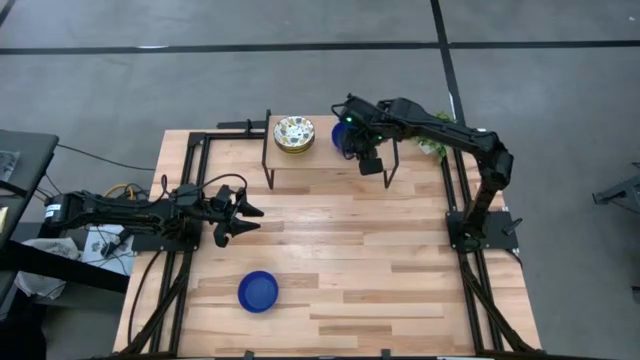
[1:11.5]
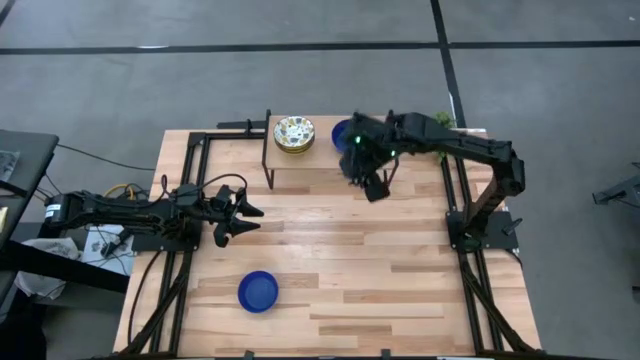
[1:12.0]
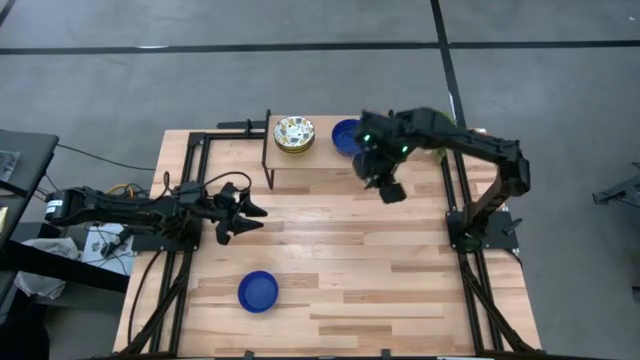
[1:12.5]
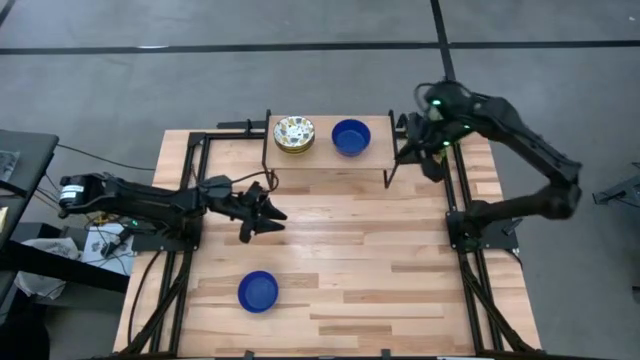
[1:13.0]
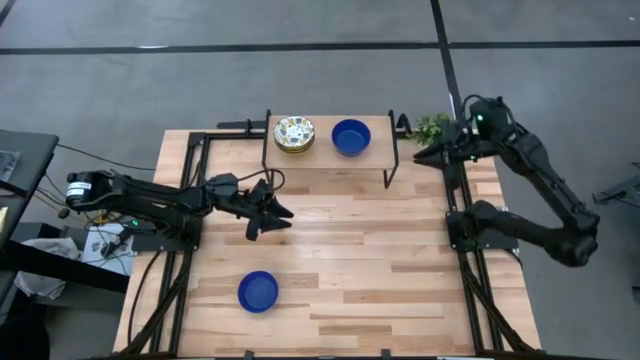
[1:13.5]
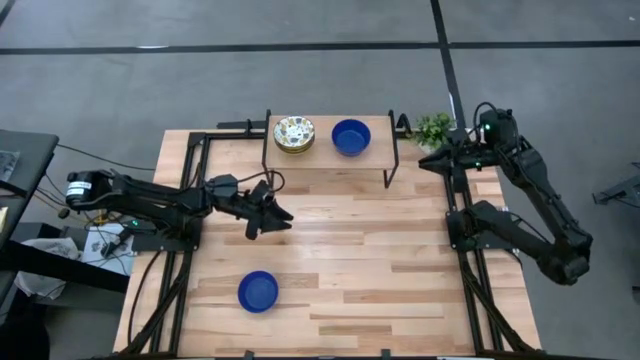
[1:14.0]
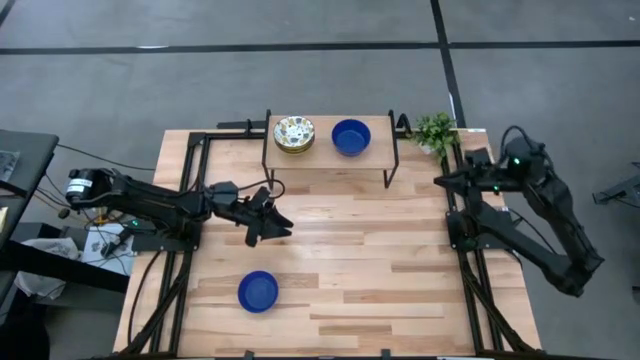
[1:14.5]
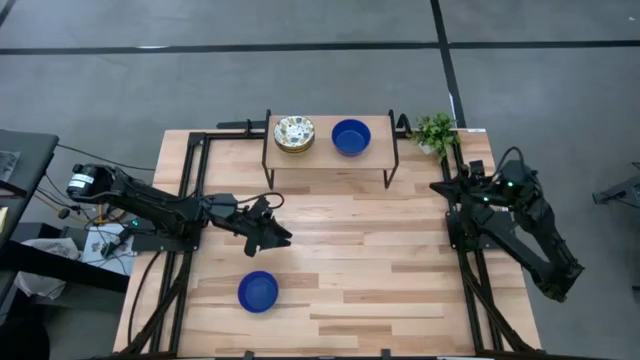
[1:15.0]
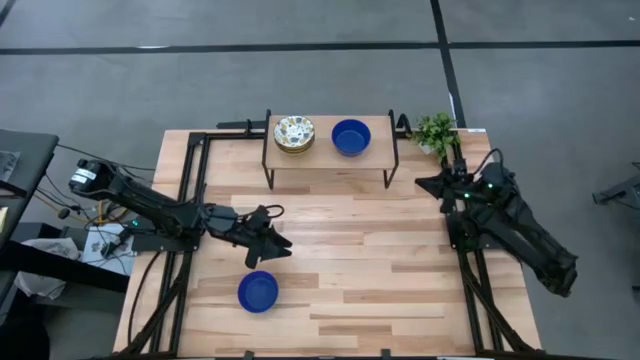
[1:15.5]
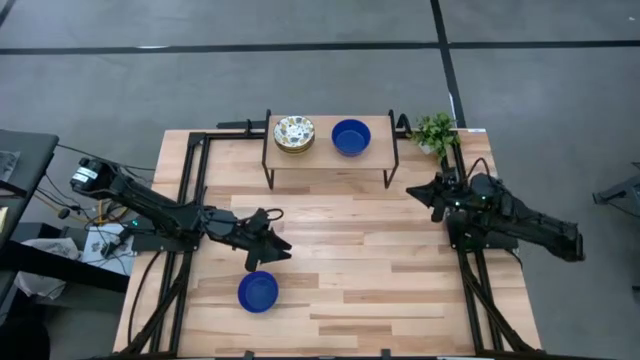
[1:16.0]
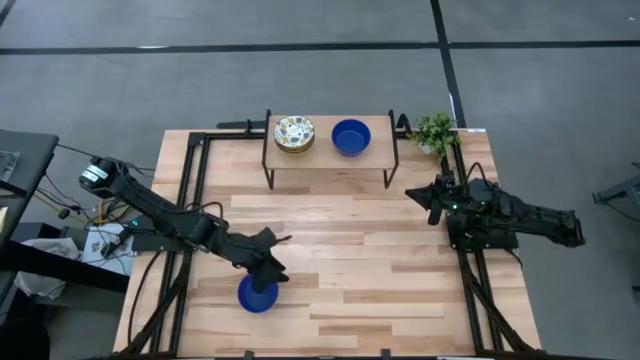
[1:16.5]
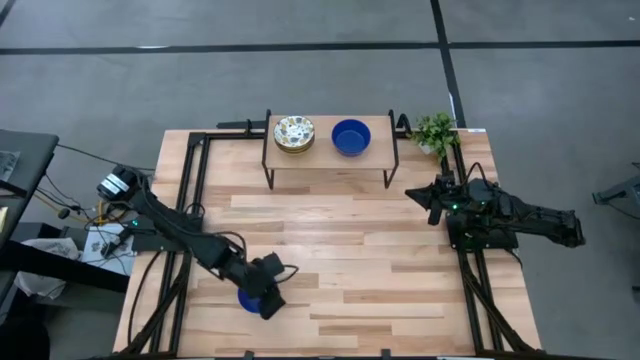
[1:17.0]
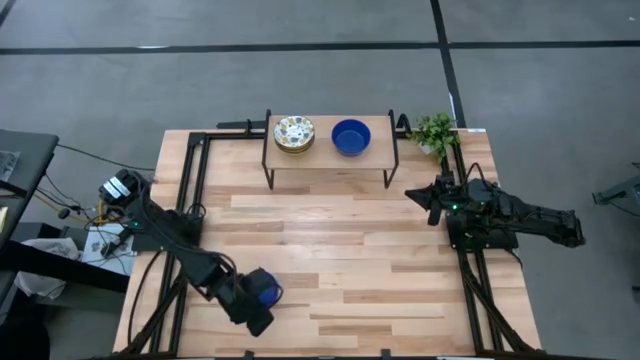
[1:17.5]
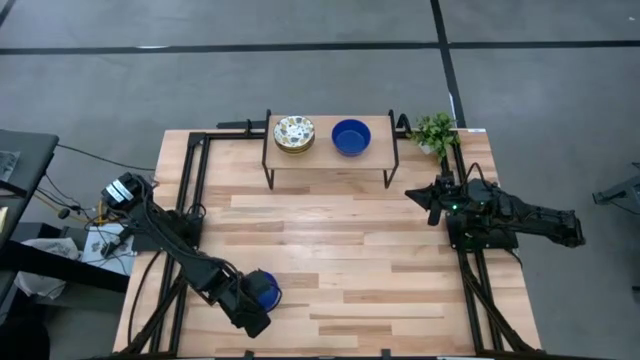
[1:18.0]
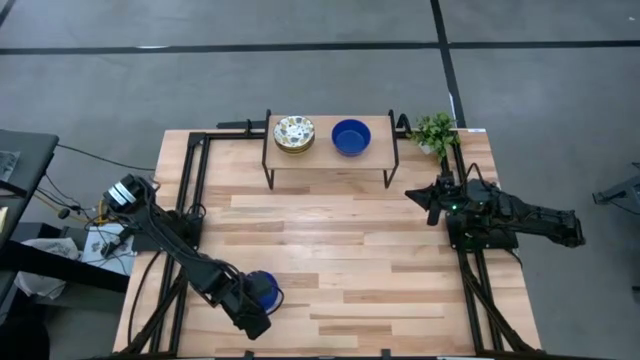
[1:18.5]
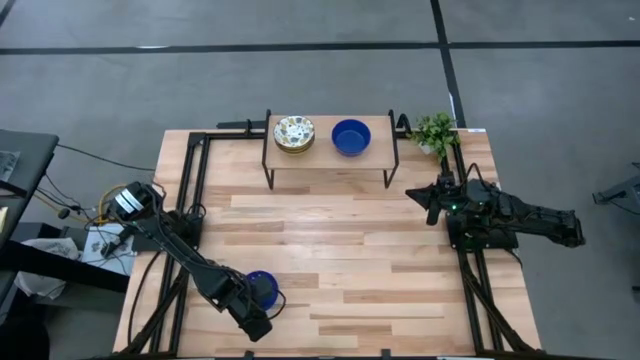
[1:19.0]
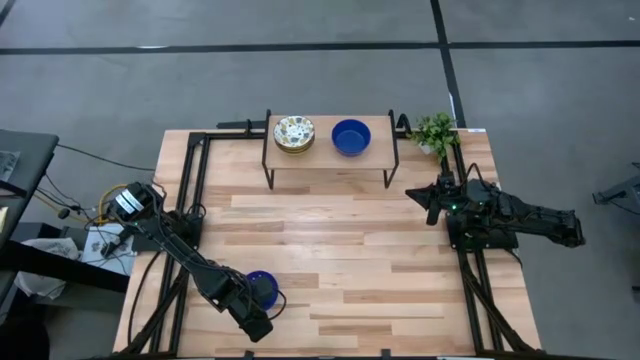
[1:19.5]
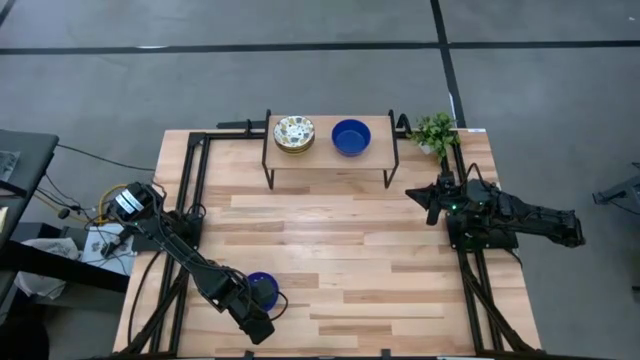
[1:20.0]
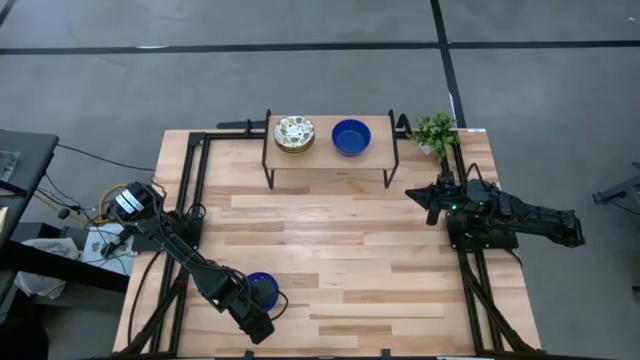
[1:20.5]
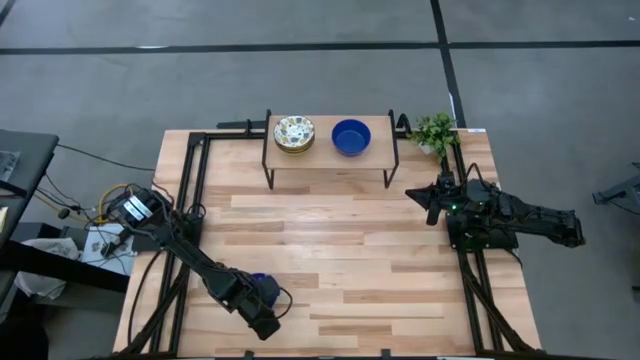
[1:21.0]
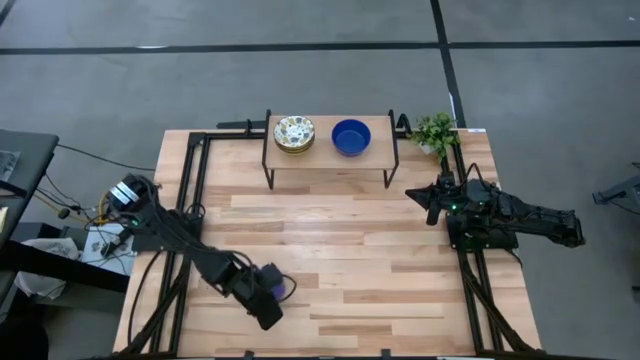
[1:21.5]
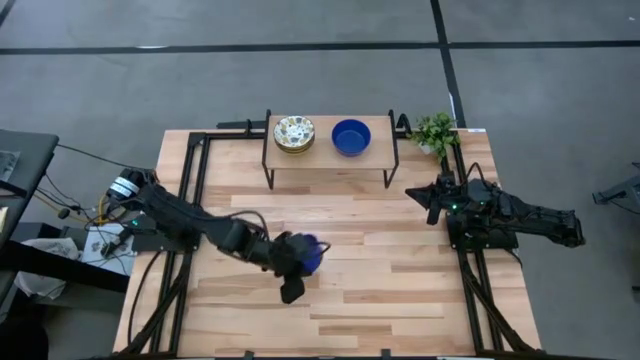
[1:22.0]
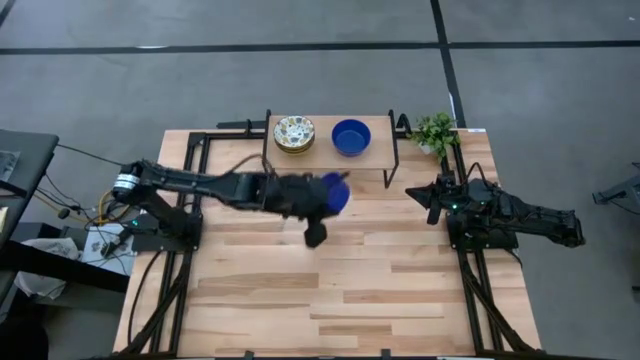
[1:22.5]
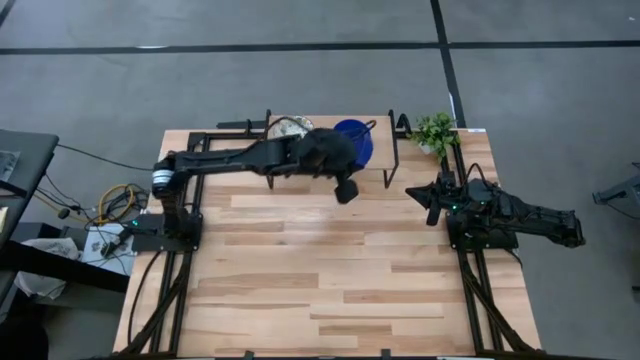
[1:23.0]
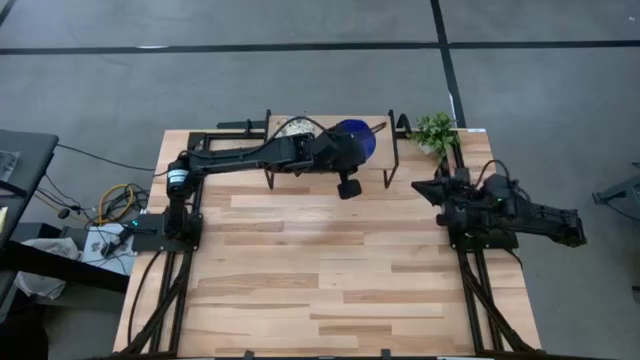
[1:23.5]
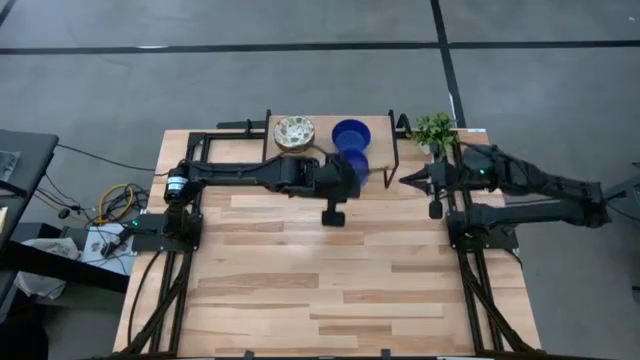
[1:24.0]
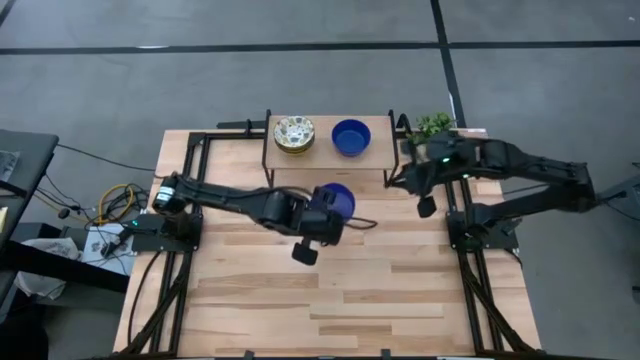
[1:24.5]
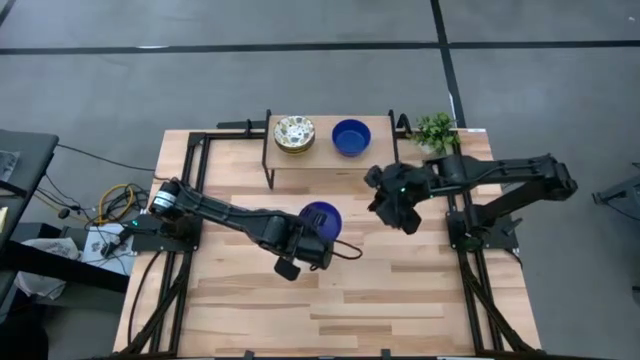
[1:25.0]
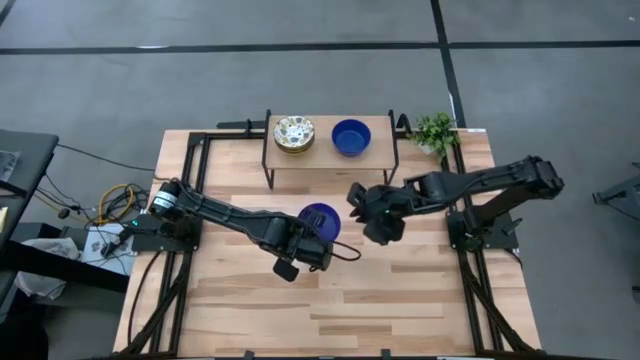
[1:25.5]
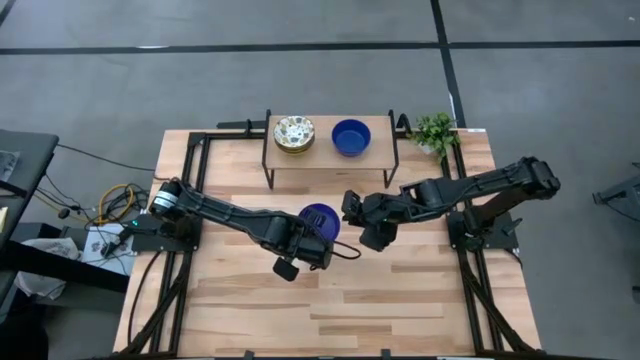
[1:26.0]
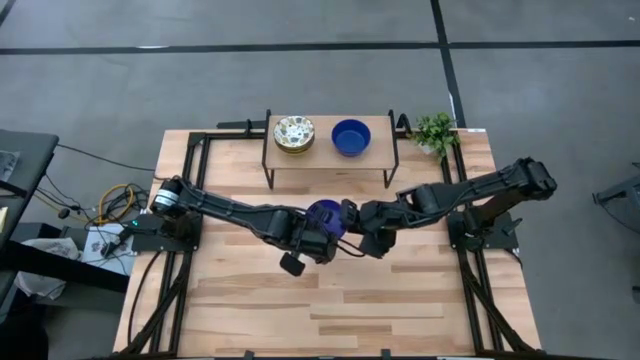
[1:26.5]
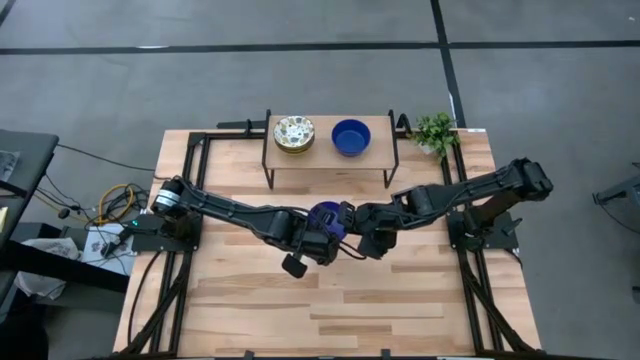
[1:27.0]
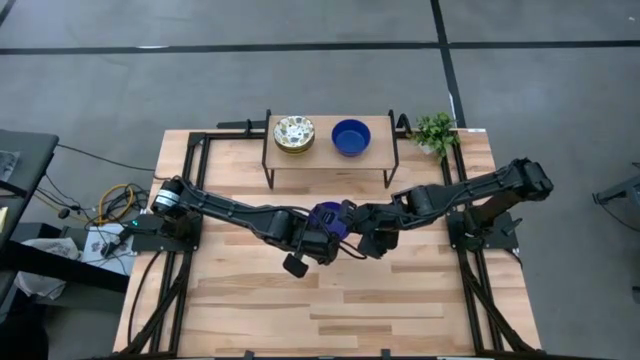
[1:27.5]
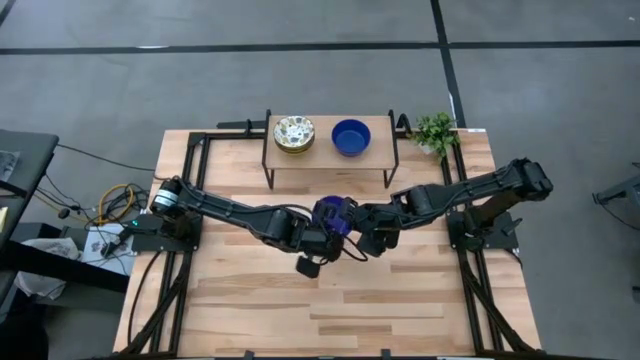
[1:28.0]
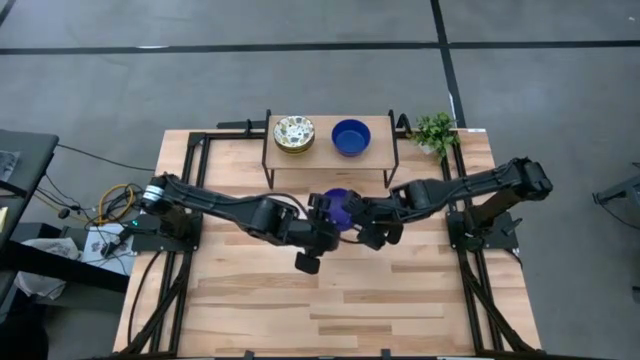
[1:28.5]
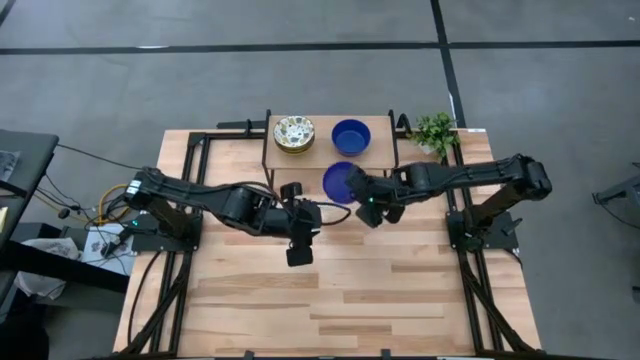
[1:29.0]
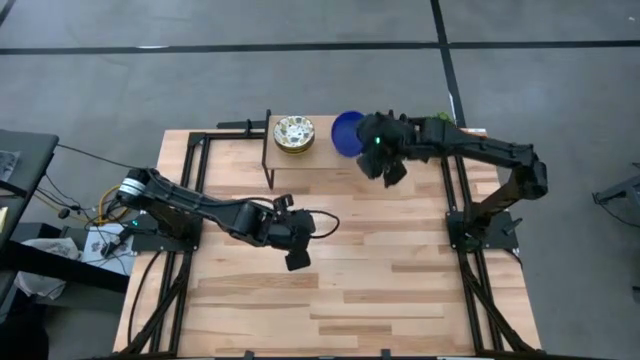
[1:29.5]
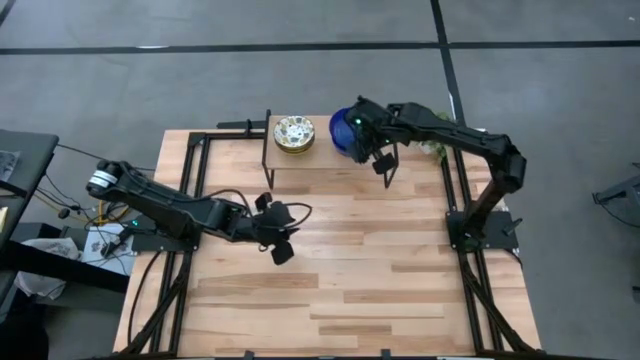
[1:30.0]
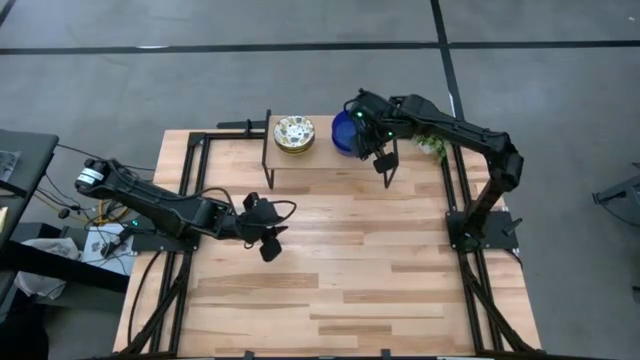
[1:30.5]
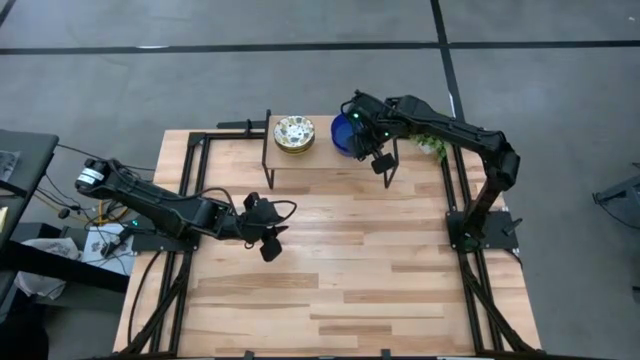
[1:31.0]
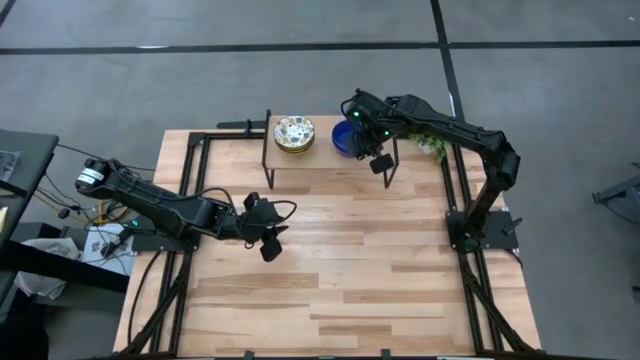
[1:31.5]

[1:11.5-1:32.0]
Task: Pick & Place Mini bowls
Stack the blue bowl on top of the blue bowl on the shelf

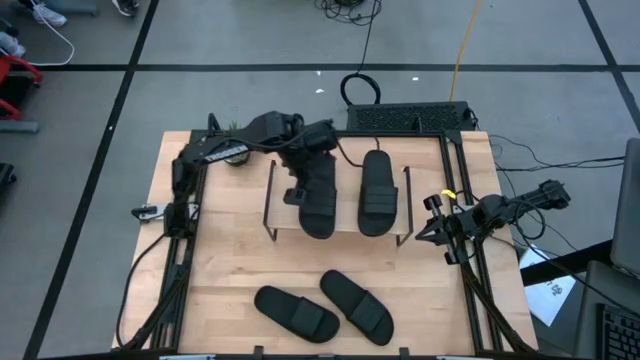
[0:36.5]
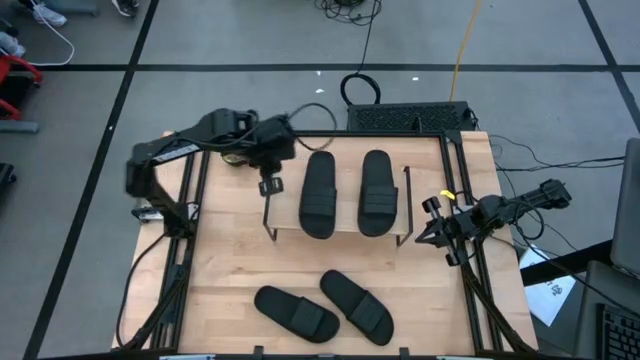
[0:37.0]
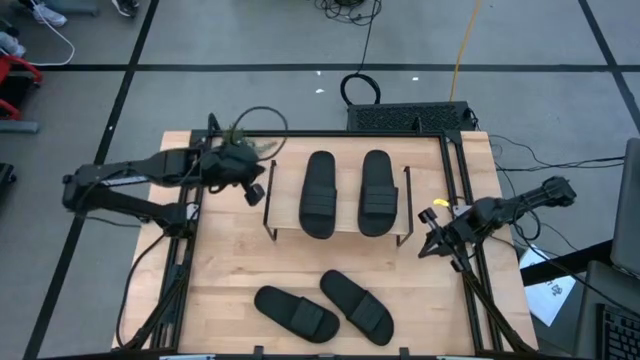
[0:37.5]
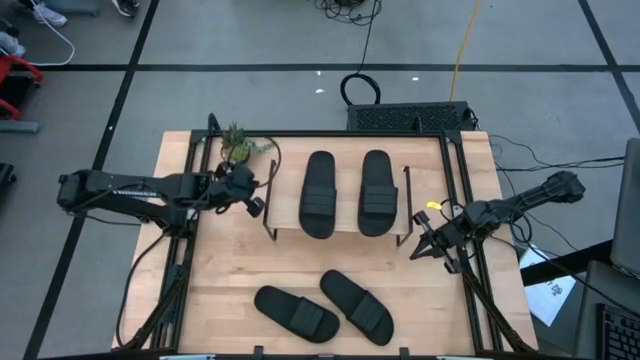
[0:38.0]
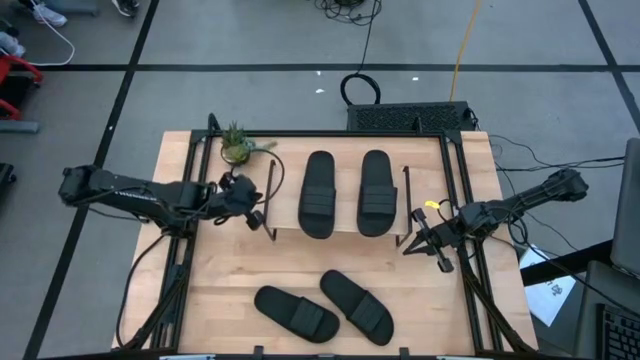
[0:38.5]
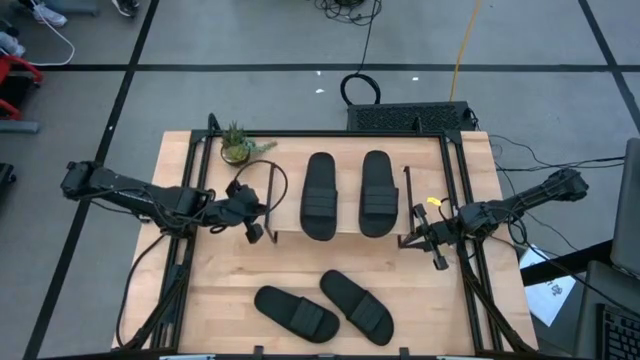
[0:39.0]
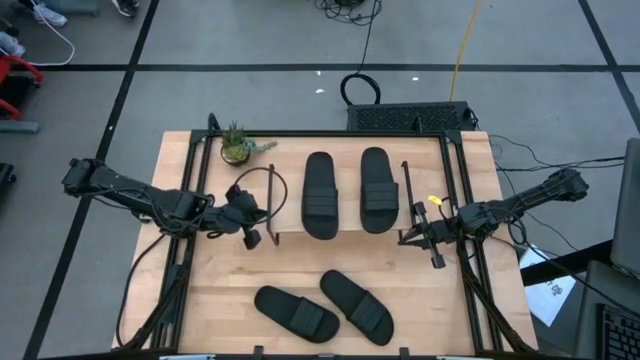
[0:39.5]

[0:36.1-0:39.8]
Task: Pick and place slides into the shelf
Adjust the shelf
